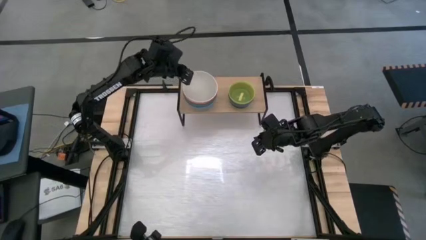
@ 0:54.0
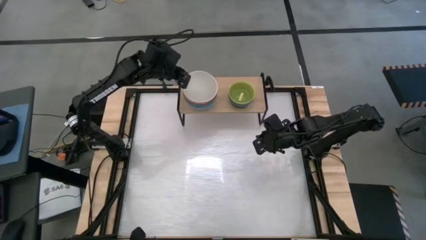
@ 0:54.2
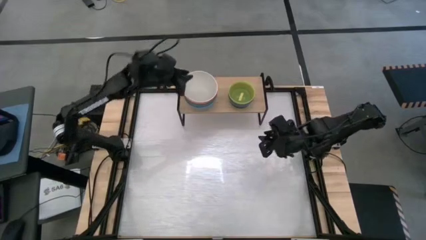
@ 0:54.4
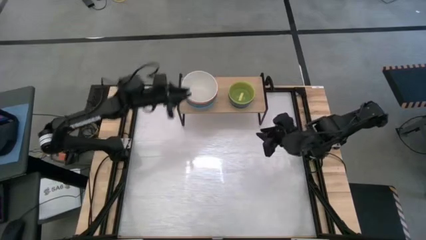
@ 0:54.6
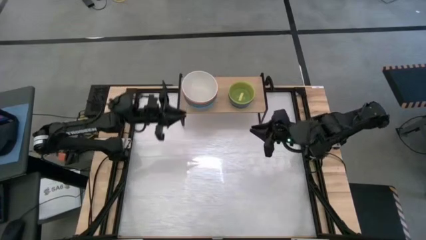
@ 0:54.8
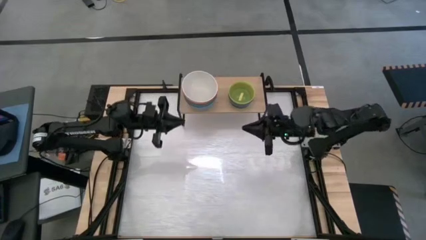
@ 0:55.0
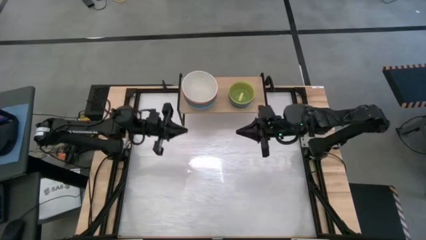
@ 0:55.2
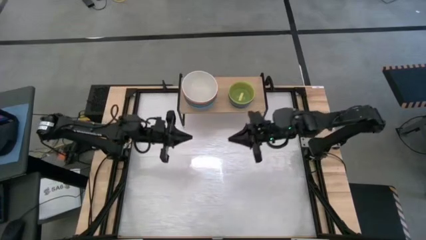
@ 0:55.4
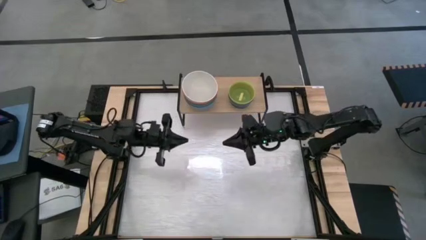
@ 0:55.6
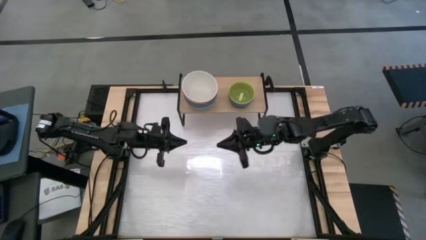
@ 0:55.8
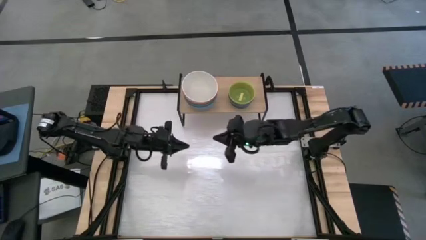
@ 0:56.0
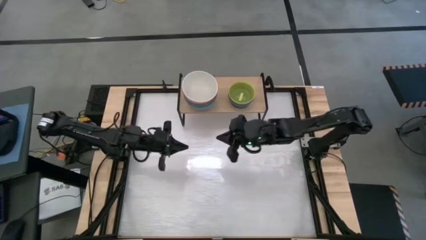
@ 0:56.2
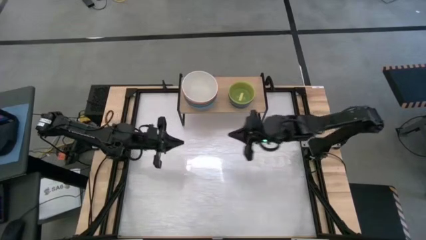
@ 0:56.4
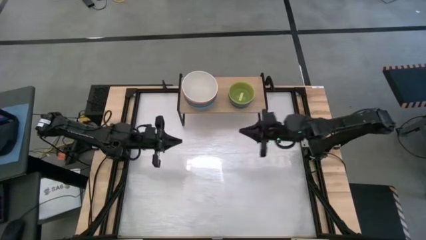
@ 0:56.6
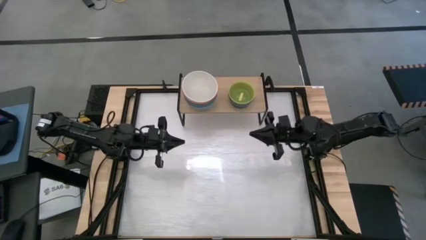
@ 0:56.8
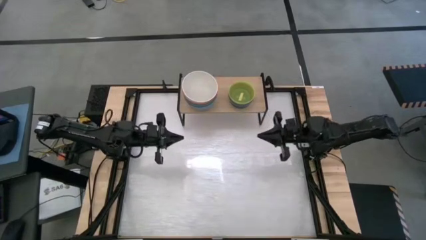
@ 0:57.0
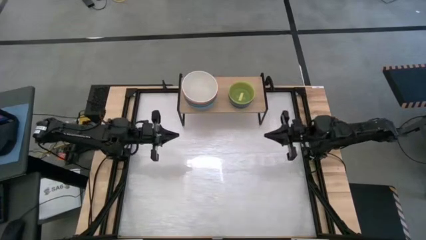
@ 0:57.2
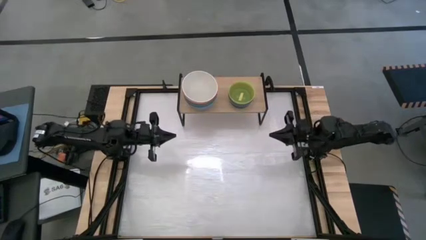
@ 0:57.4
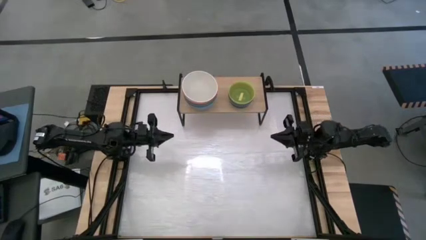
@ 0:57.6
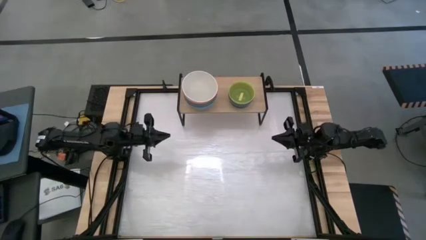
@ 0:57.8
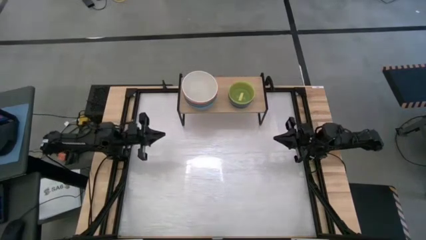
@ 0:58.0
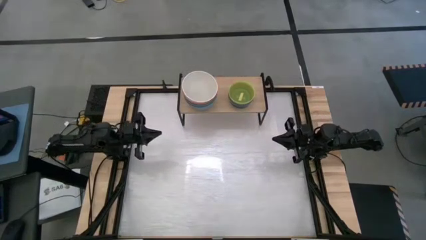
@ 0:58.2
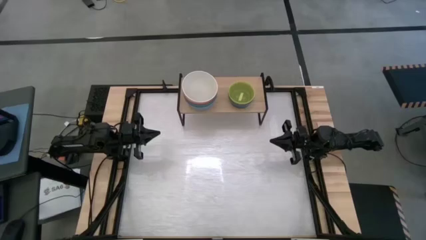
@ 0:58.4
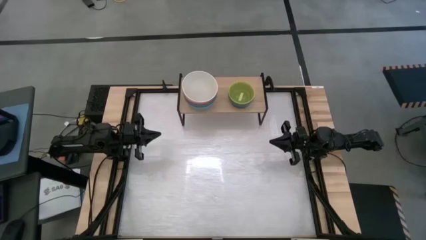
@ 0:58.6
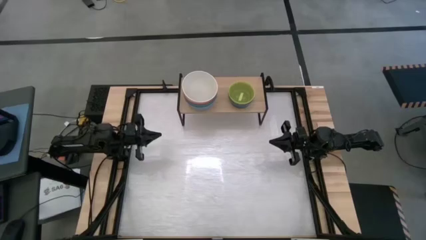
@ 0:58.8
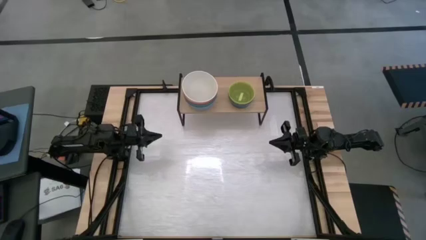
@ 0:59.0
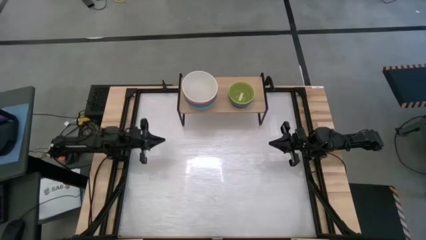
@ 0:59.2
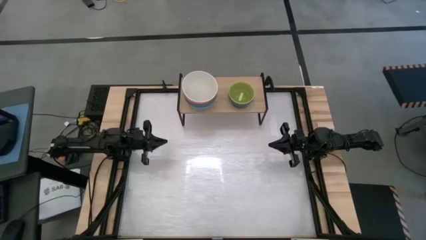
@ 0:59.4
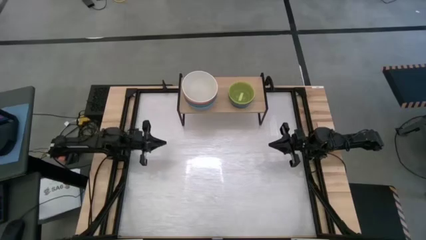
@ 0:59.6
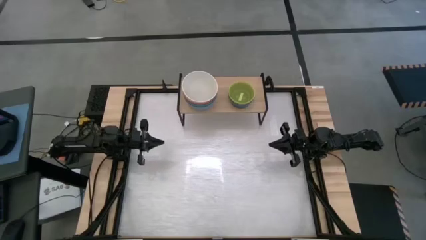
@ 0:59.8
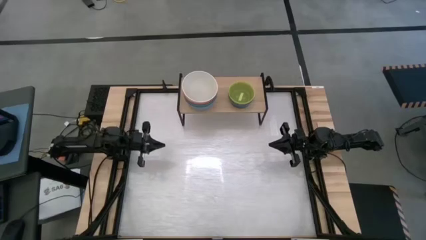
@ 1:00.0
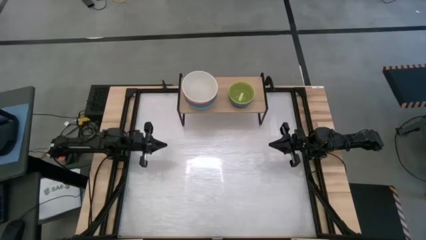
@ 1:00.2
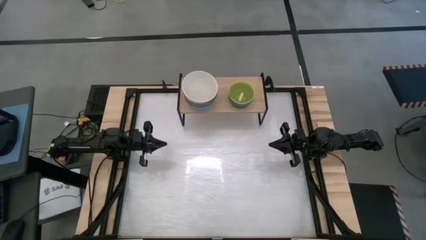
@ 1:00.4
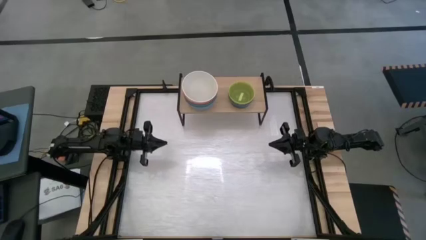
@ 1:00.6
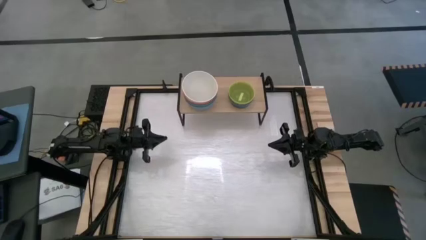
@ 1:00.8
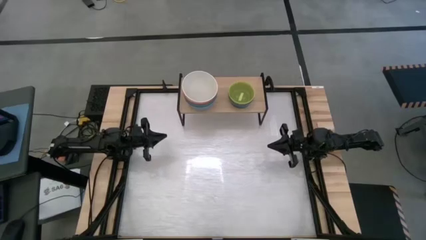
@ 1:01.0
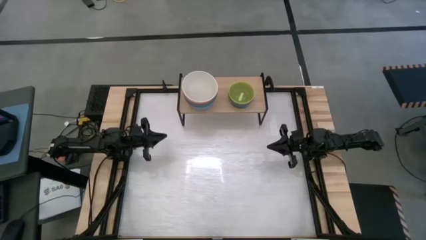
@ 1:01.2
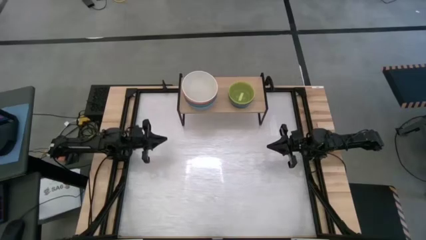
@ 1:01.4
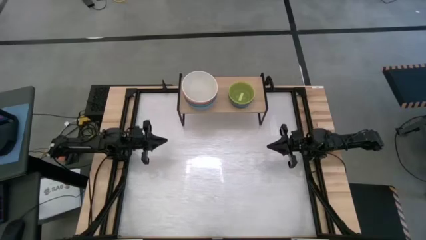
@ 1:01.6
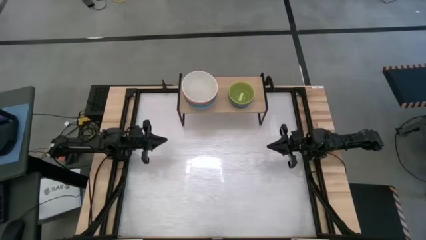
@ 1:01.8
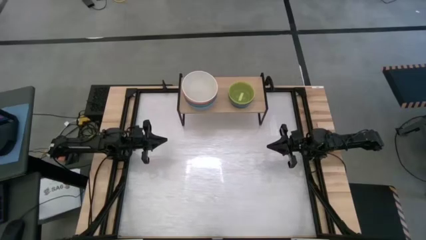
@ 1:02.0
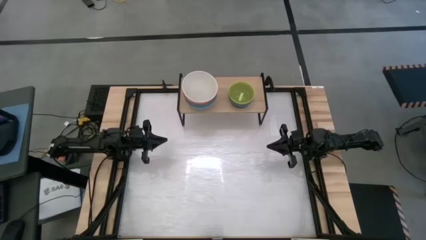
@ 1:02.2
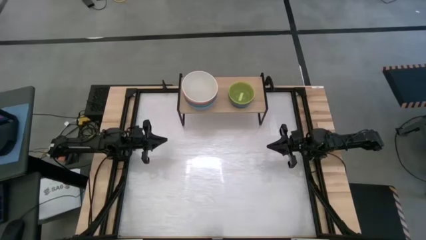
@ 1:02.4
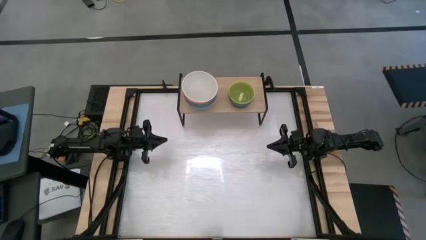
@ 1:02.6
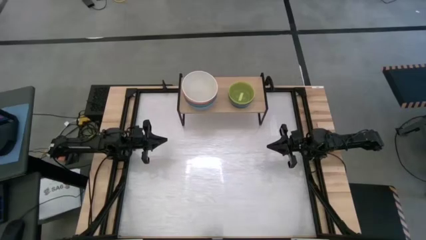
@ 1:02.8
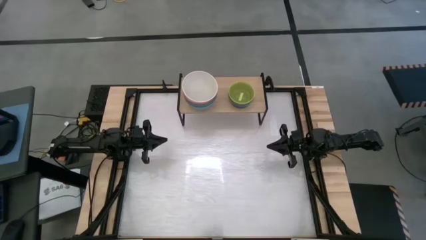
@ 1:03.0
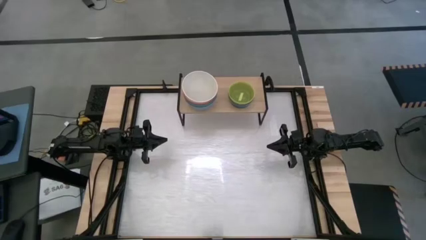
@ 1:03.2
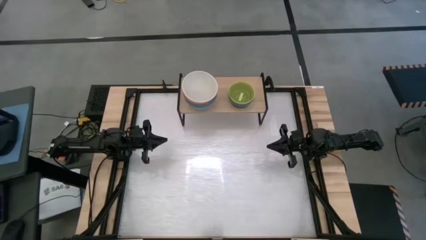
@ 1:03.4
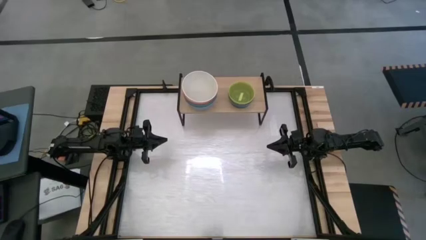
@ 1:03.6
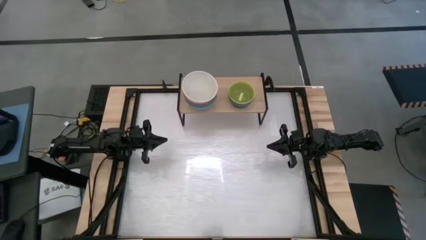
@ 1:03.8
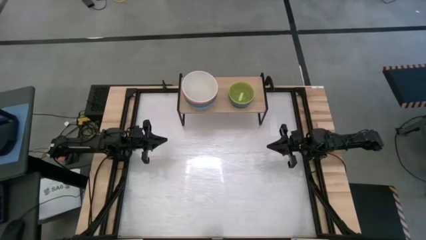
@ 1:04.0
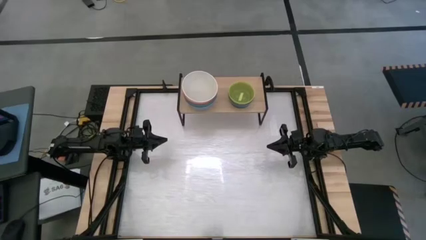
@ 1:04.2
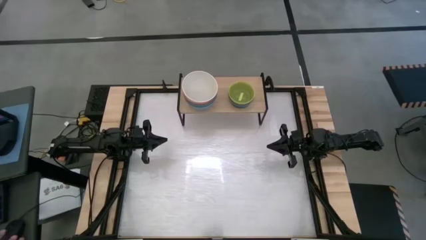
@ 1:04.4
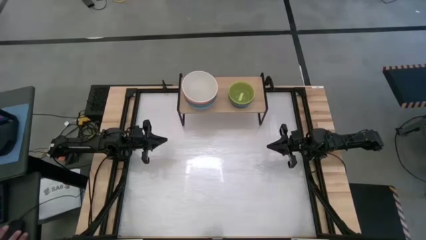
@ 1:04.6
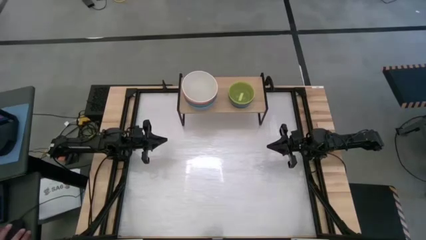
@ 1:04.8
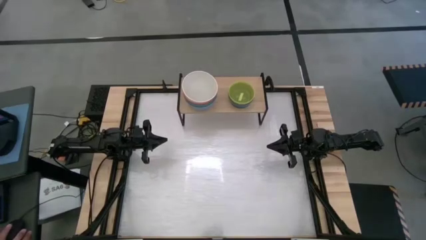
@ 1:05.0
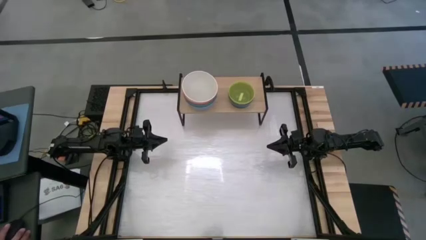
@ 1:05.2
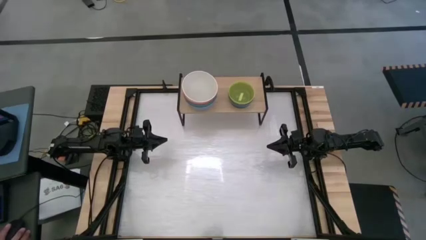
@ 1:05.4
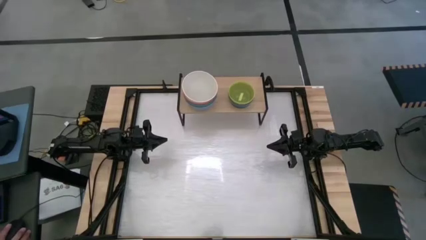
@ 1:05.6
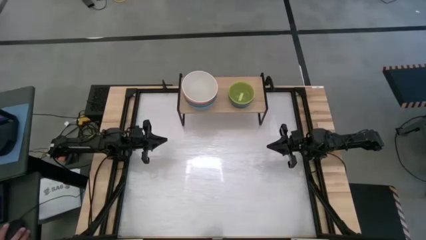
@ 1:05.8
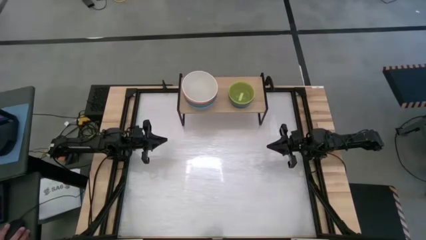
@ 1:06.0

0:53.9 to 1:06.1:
Task: Place and stack bowls onto a shelf
Return to Home Position

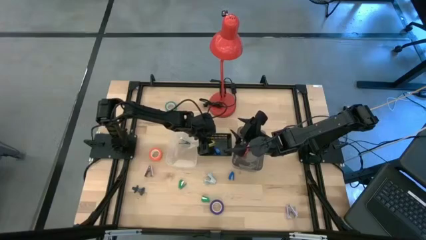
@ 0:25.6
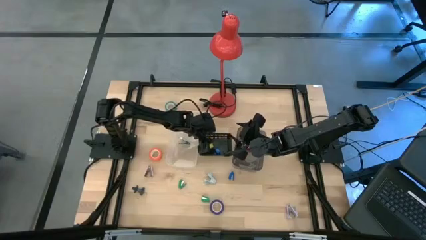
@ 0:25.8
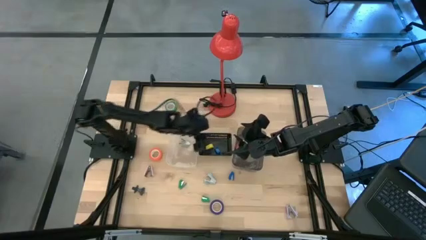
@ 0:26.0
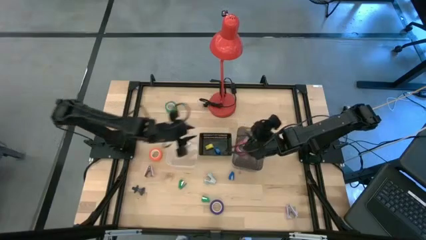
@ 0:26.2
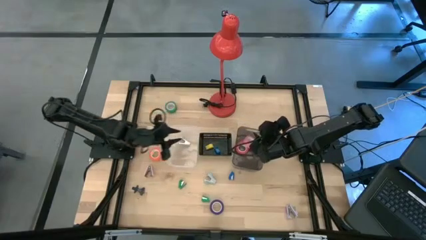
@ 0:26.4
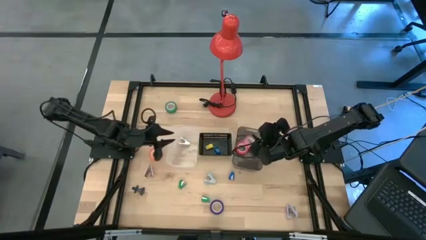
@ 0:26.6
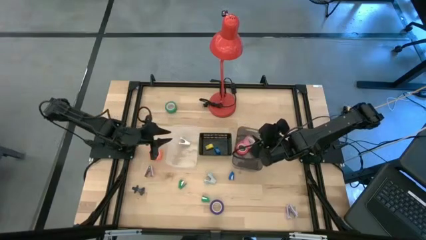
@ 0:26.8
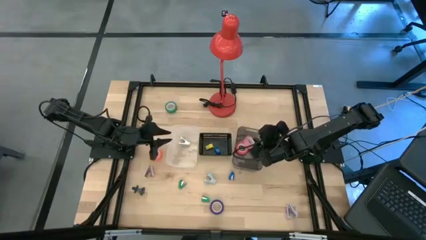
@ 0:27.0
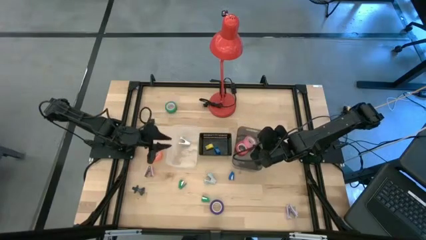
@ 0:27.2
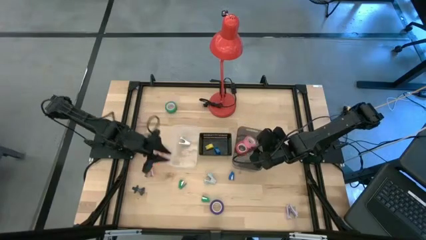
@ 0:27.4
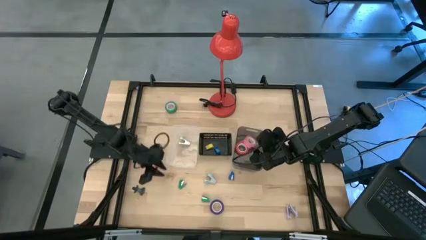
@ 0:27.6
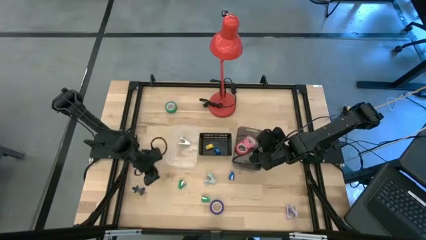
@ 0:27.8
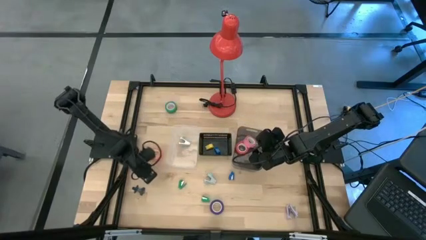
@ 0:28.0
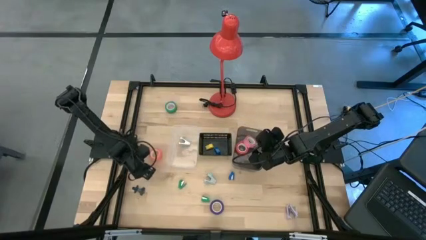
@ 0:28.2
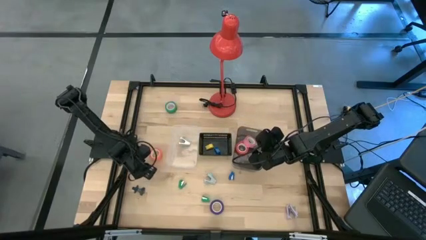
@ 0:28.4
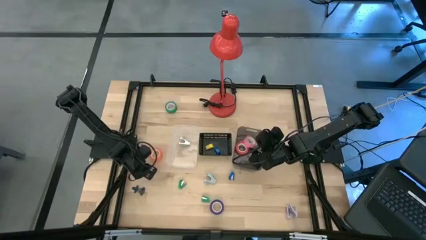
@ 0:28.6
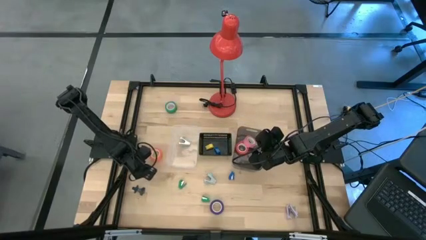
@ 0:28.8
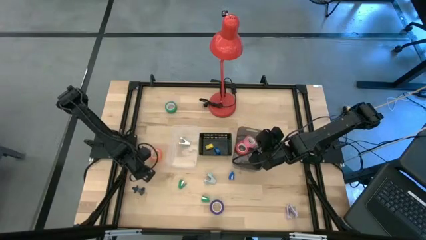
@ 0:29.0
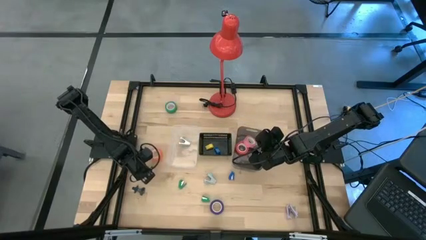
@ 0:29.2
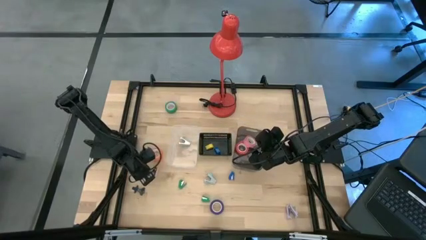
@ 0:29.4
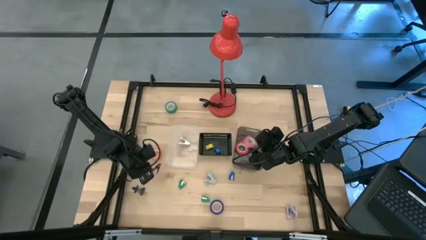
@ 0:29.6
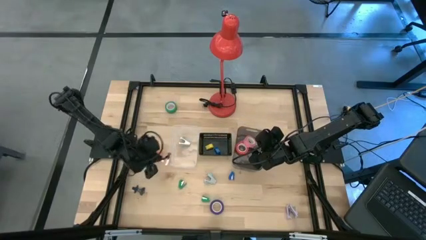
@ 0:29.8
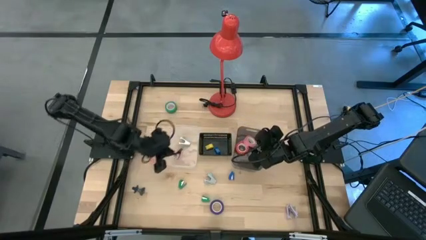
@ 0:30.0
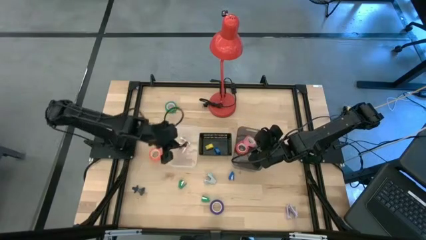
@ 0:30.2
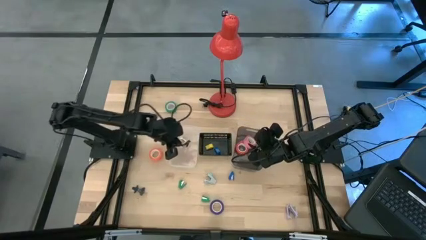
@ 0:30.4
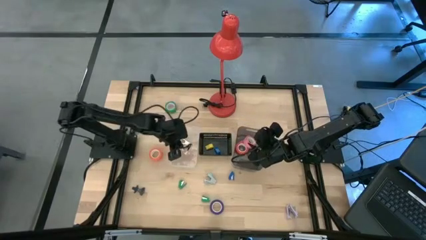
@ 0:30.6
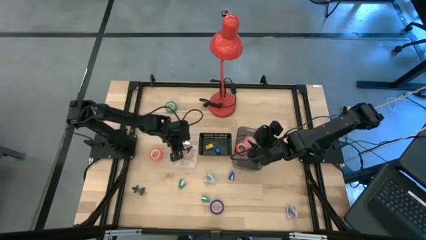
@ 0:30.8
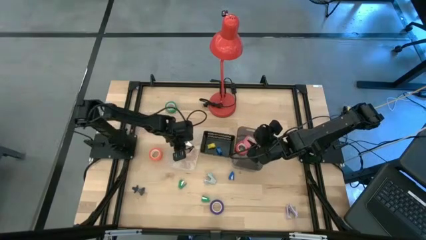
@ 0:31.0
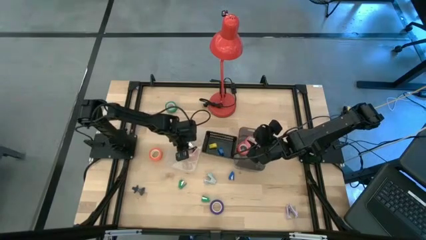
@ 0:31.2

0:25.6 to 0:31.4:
Task: Pick and place Stapler, Stapler remover, tape
Put the pink staple remover into the transparent bin
